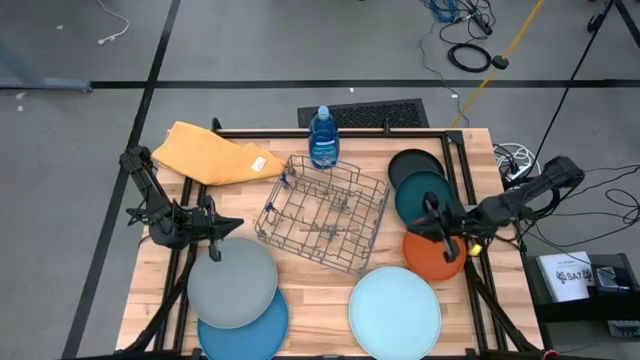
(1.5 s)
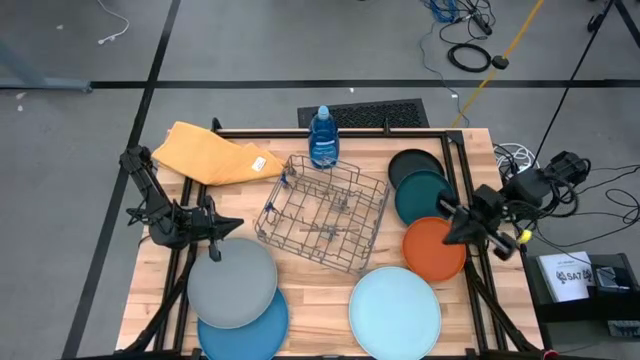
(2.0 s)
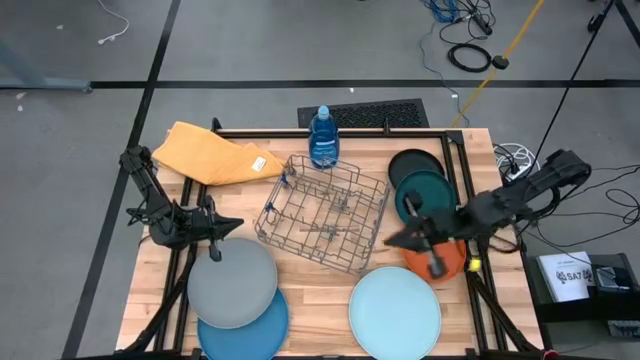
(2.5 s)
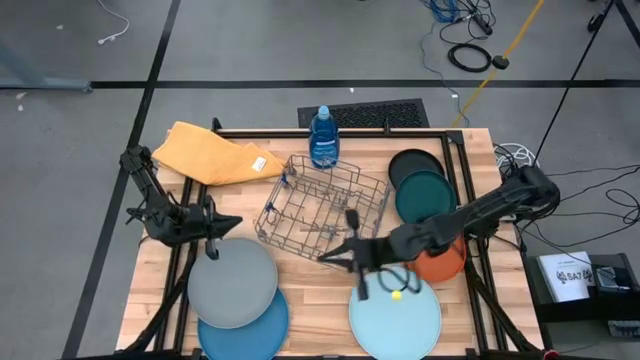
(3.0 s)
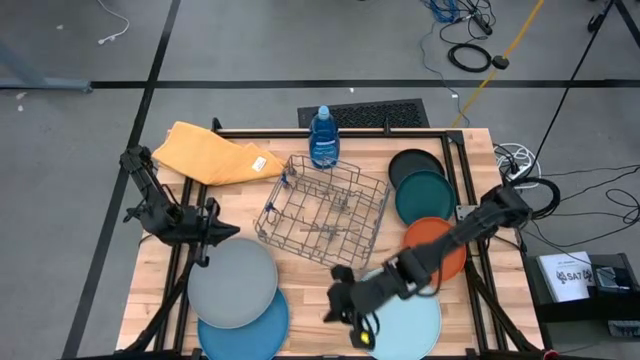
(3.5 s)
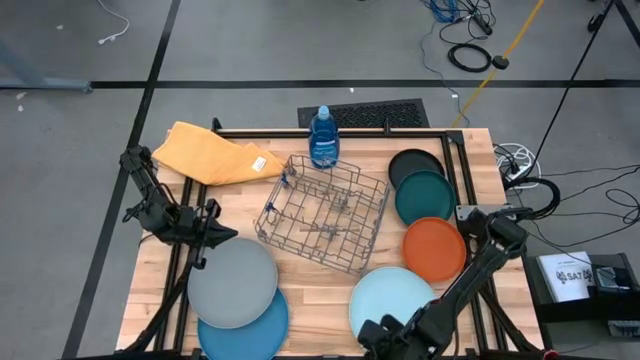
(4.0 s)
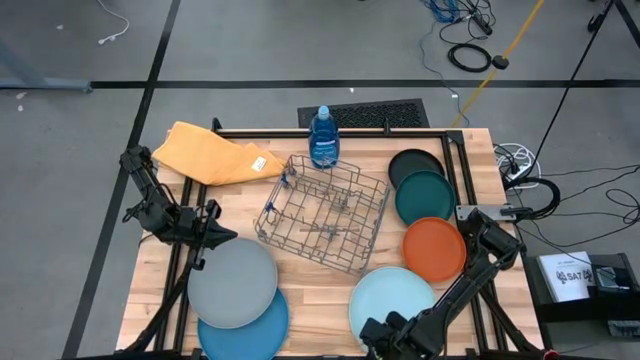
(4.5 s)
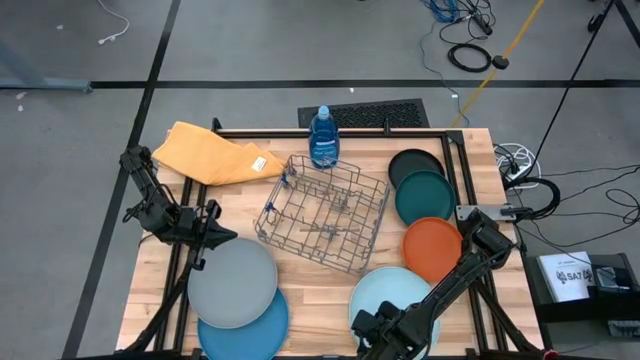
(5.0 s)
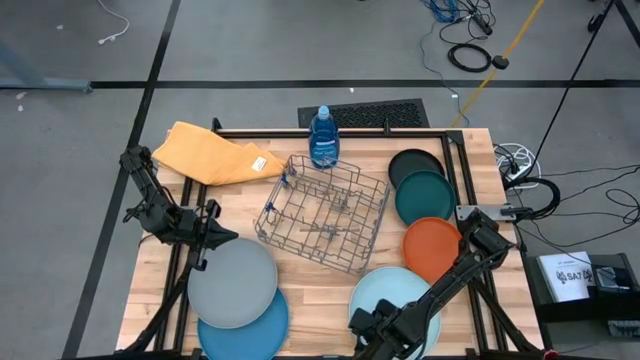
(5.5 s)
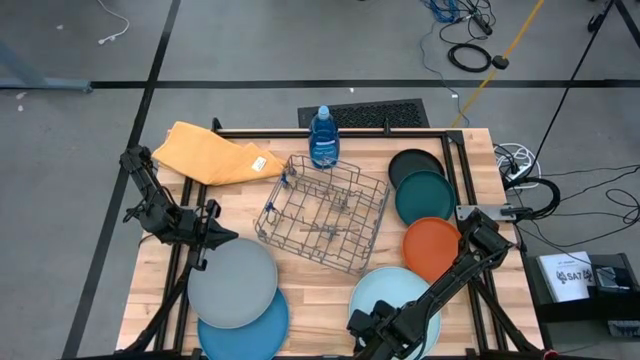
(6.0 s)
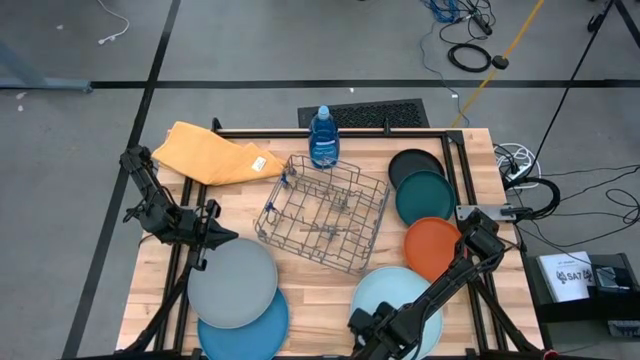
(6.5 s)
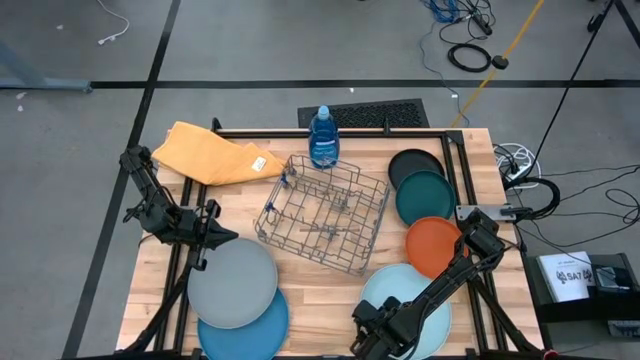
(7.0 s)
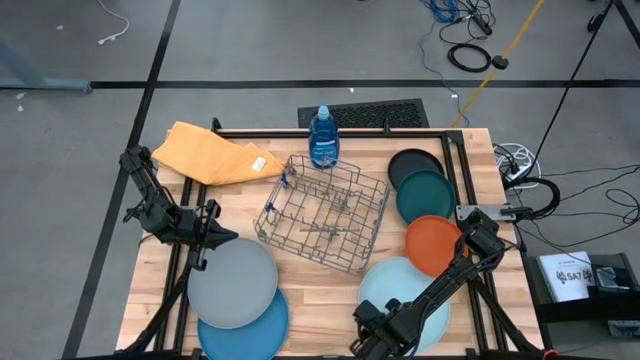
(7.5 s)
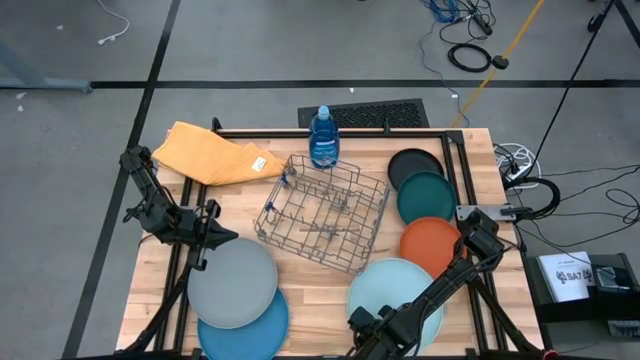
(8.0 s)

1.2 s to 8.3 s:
Task: Sort dishes
Put the white plate into the dish rack

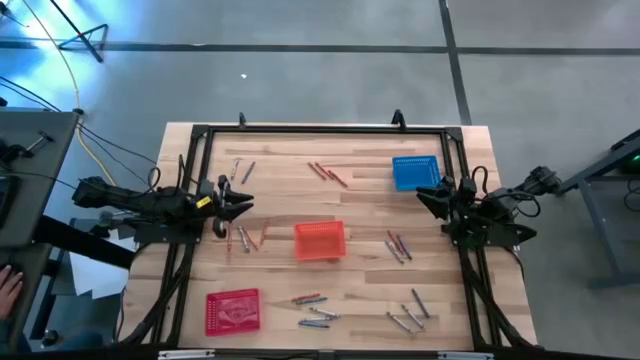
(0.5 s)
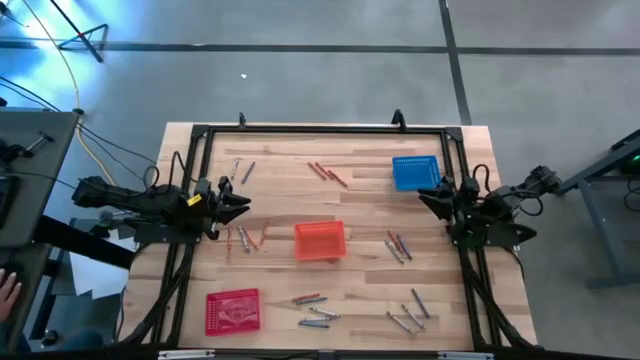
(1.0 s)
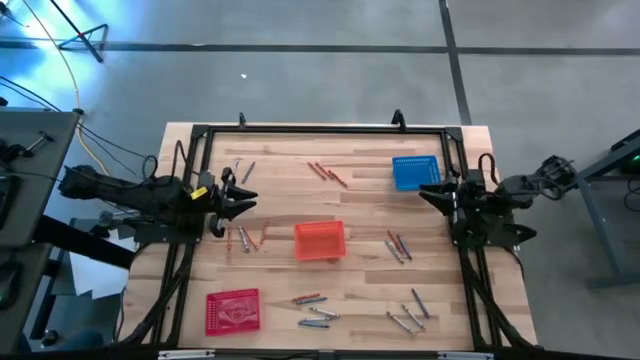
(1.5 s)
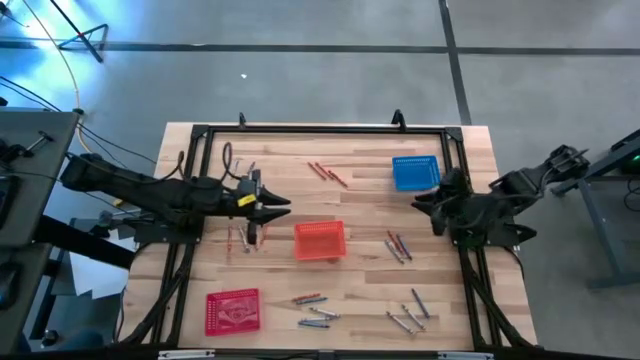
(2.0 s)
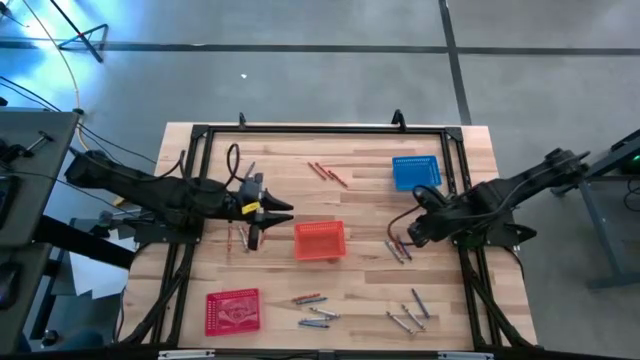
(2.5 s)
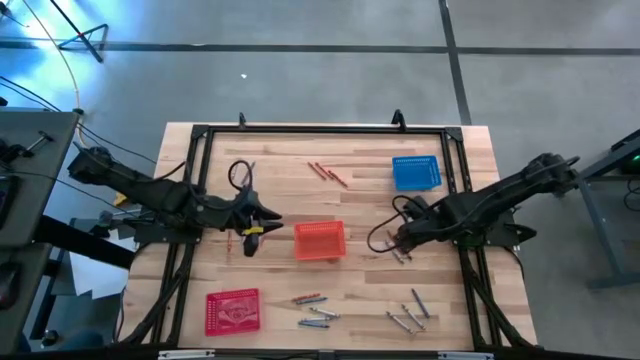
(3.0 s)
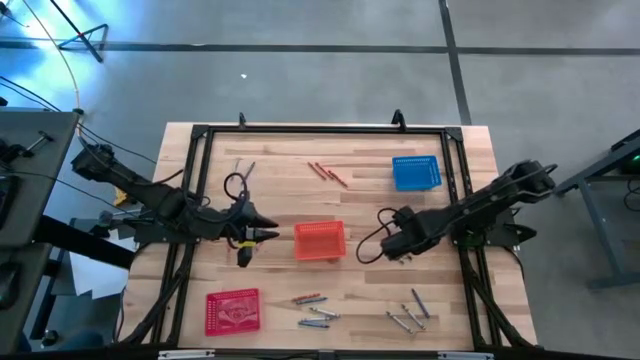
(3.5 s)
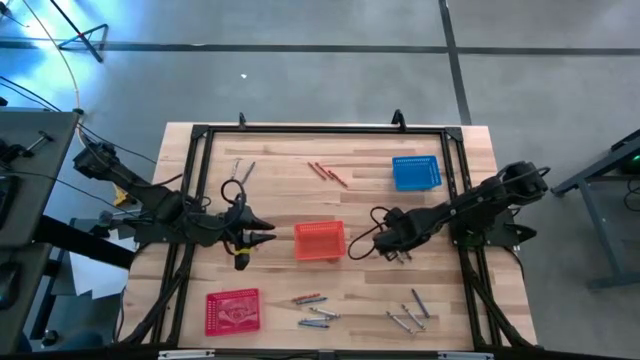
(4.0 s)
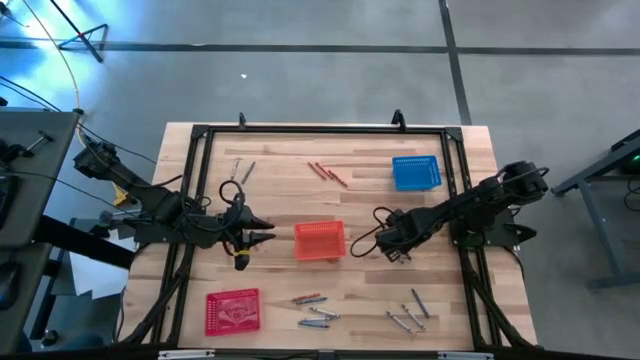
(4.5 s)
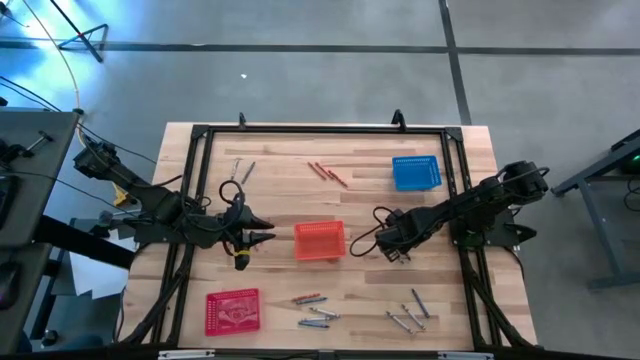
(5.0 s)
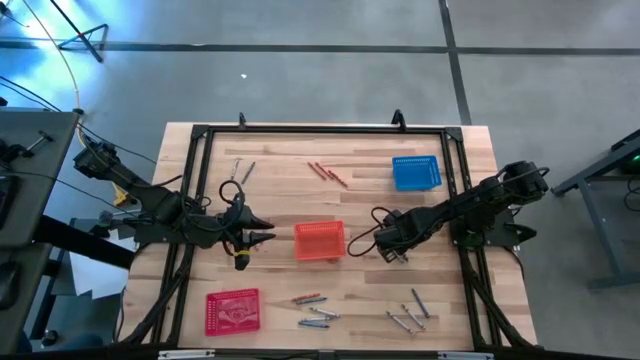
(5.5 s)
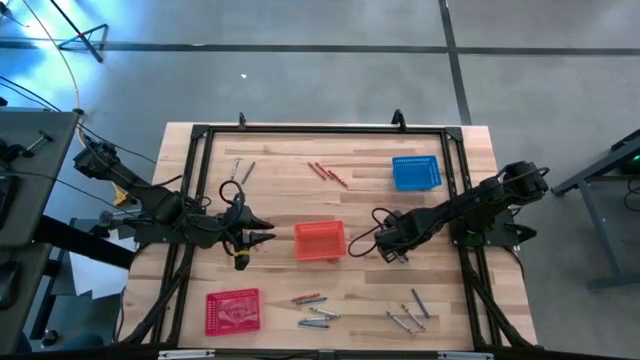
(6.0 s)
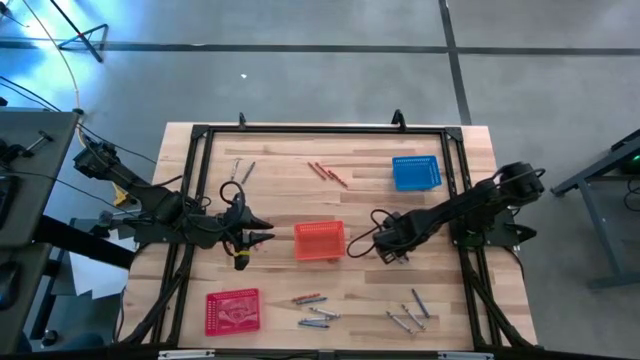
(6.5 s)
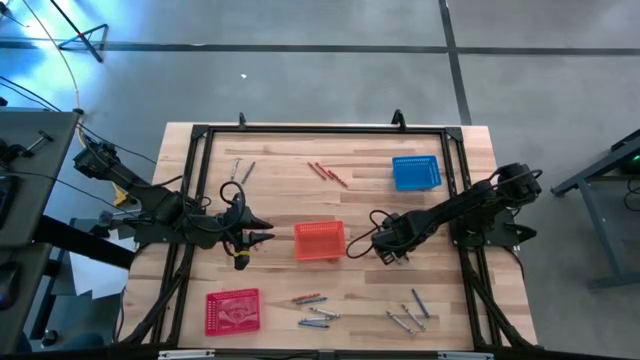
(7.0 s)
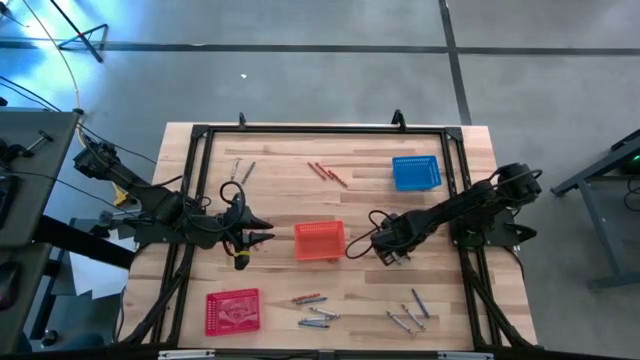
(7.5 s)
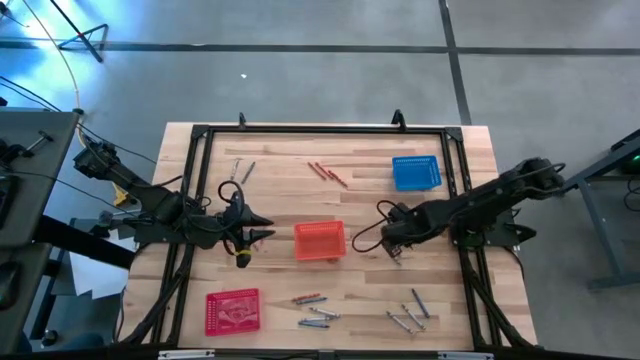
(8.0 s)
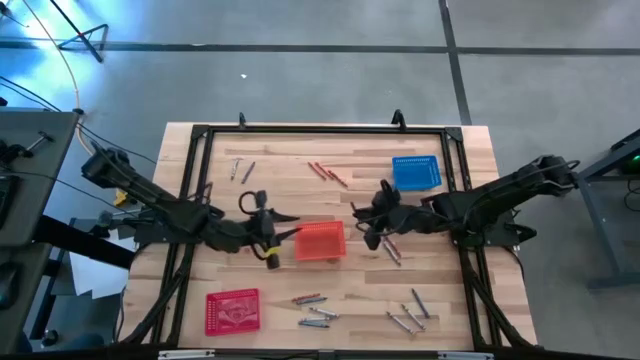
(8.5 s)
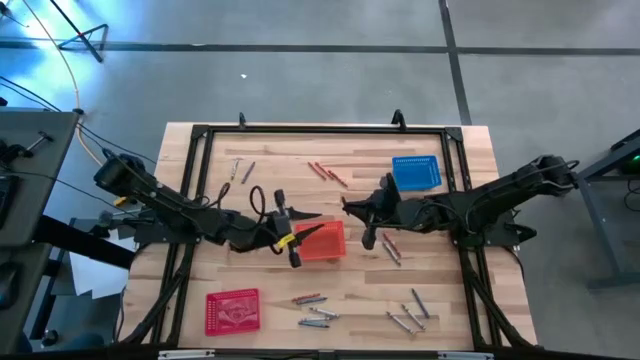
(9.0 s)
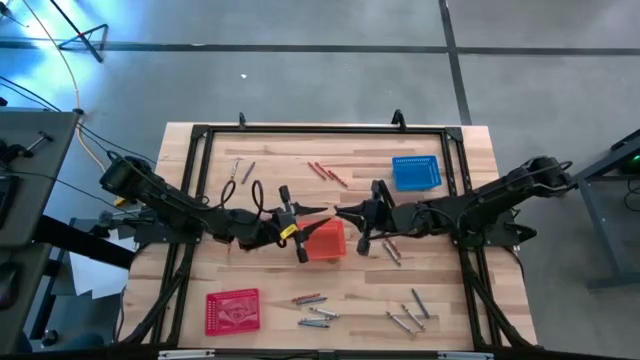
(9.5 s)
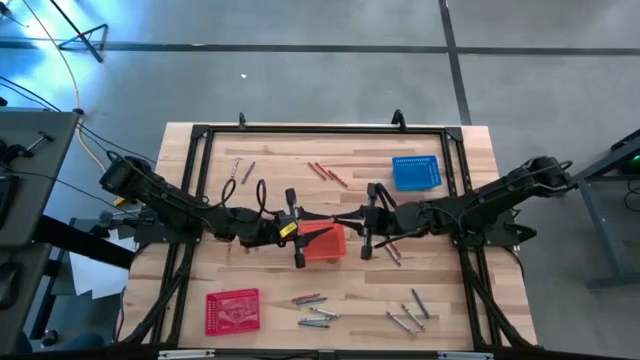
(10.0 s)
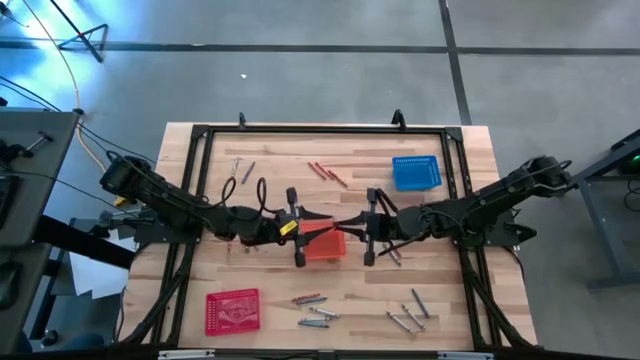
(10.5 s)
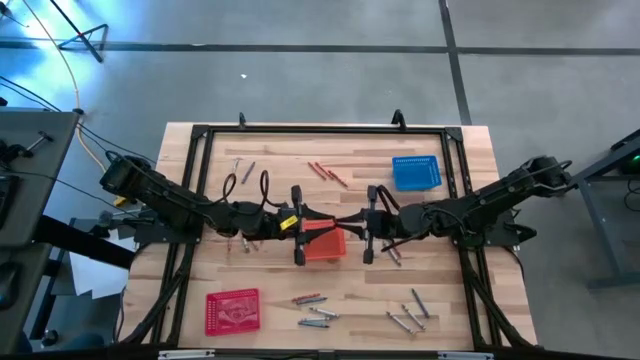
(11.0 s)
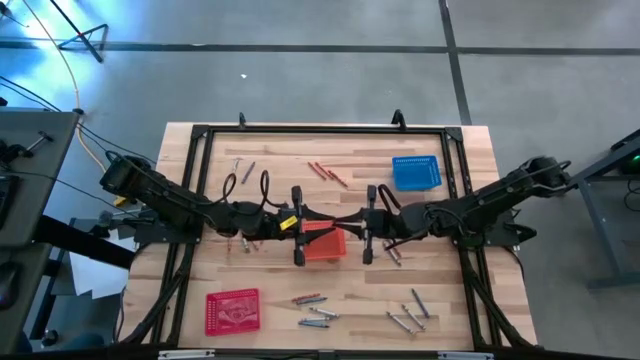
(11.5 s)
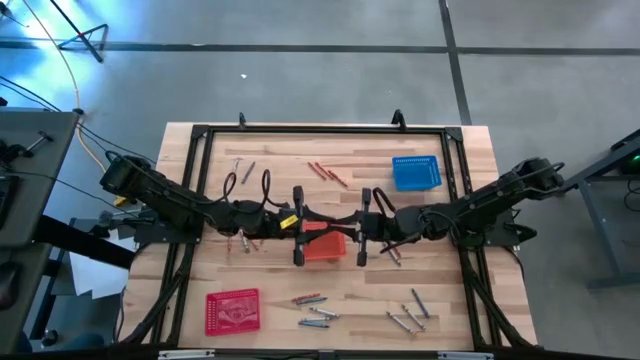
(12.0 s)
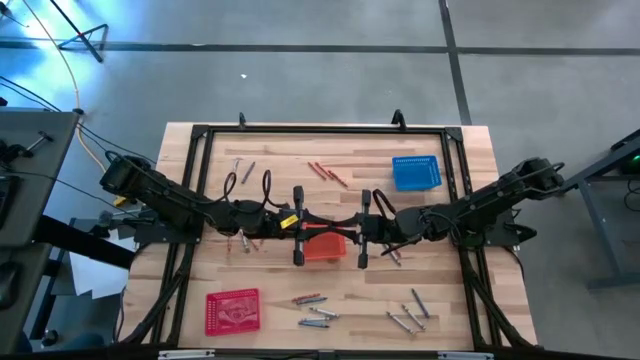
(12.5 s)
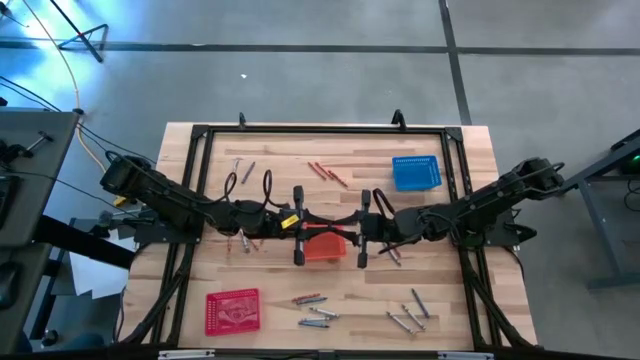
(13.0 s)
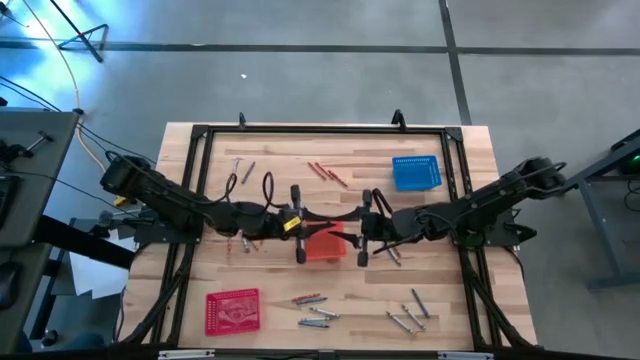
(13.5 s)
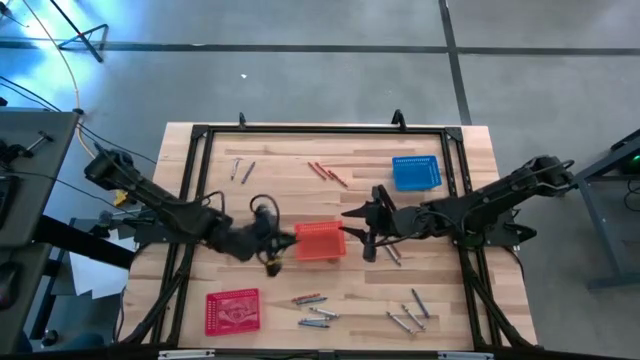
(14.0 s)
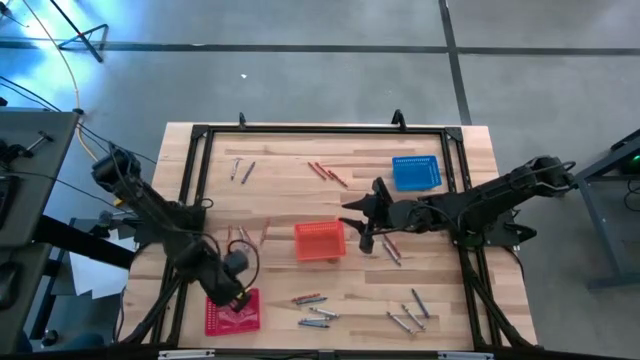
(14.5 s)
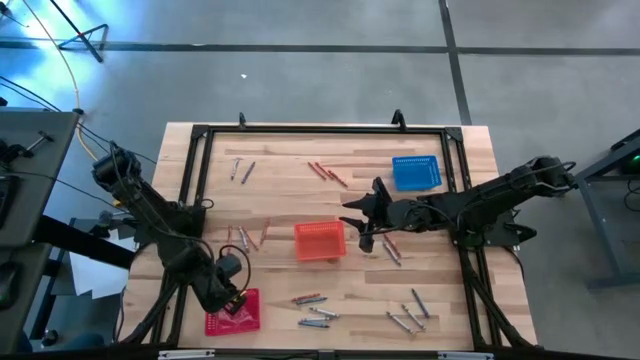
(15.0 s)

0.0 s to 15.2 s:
Task: Sort crayons
Put the blue crayon into the red bin
